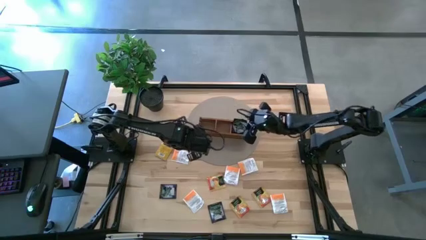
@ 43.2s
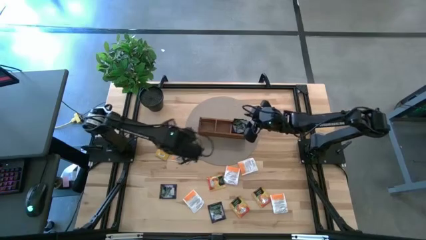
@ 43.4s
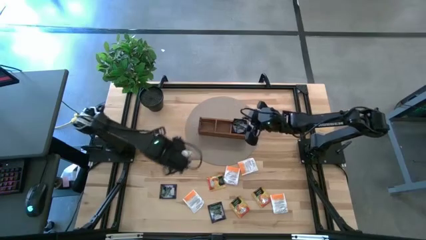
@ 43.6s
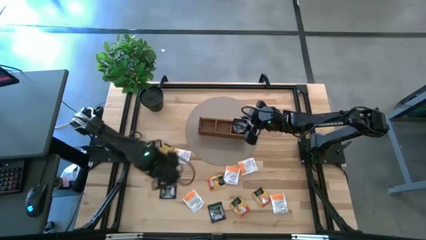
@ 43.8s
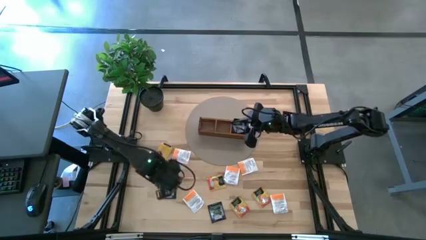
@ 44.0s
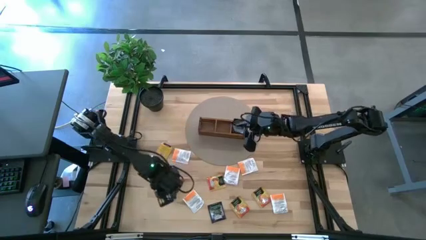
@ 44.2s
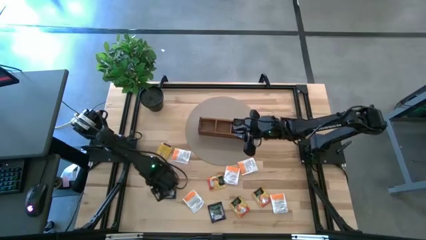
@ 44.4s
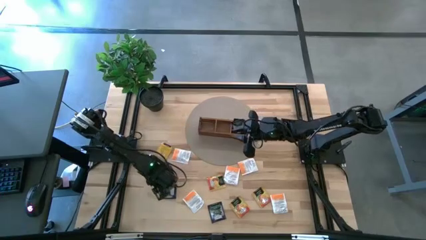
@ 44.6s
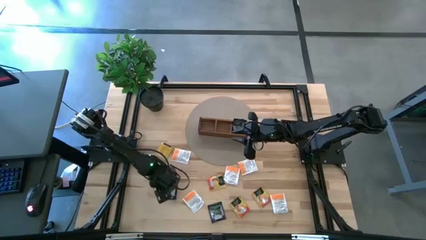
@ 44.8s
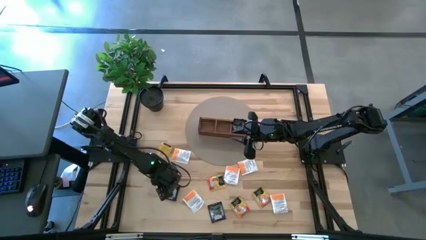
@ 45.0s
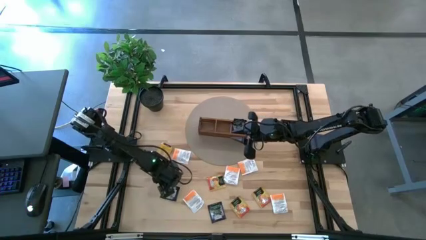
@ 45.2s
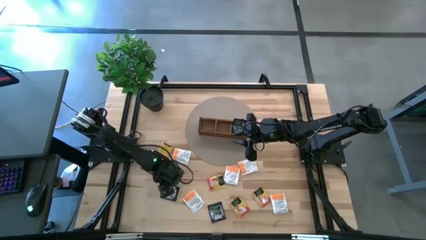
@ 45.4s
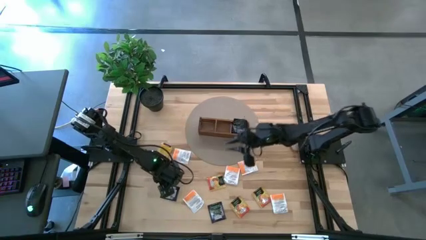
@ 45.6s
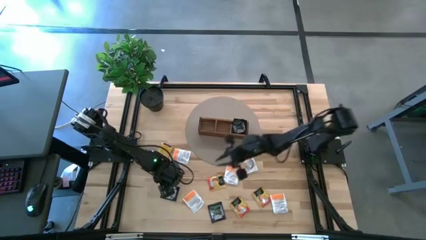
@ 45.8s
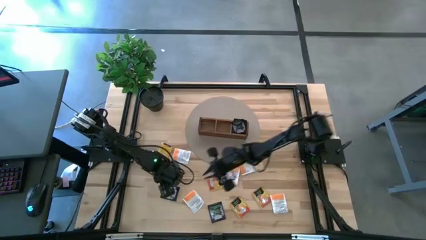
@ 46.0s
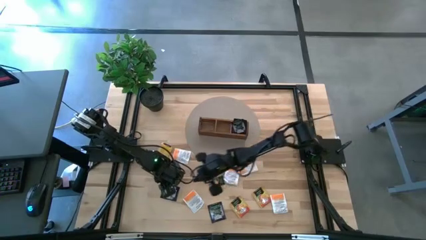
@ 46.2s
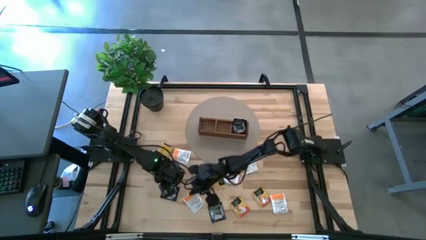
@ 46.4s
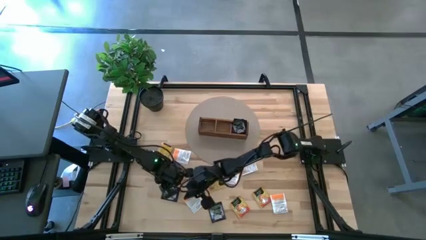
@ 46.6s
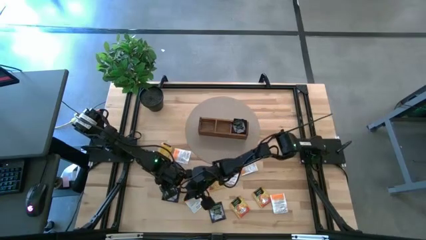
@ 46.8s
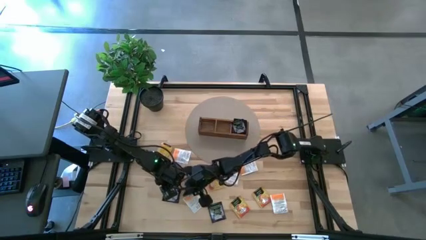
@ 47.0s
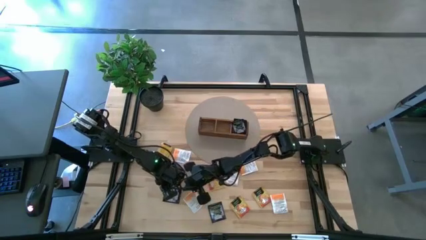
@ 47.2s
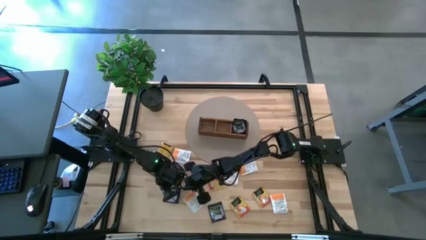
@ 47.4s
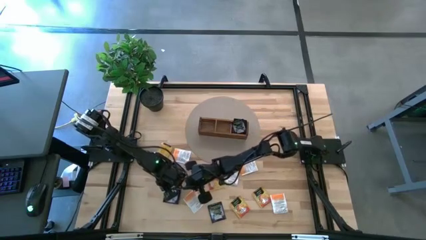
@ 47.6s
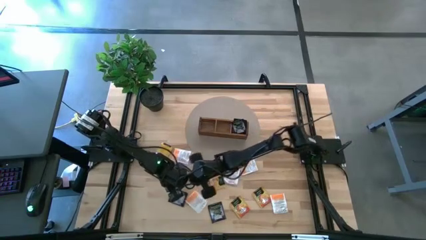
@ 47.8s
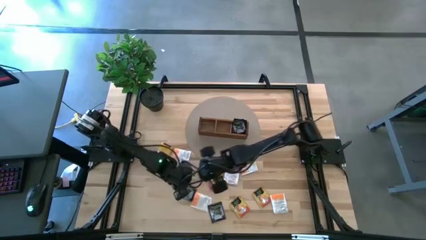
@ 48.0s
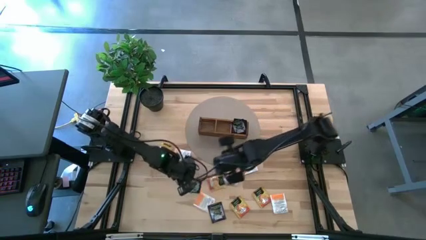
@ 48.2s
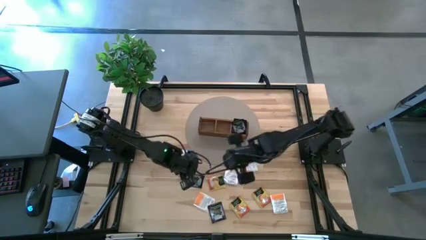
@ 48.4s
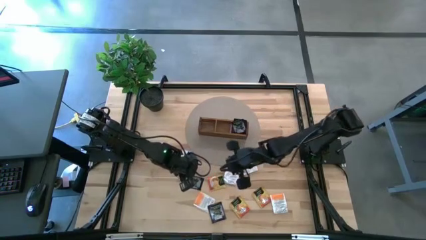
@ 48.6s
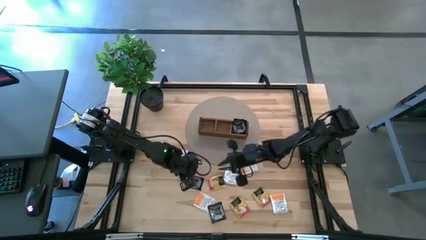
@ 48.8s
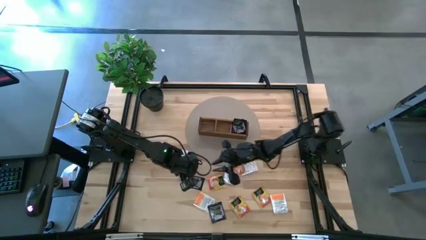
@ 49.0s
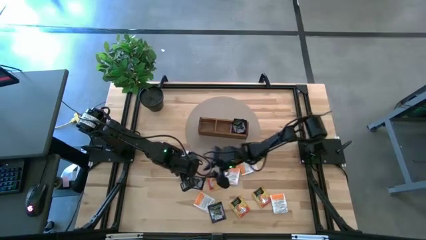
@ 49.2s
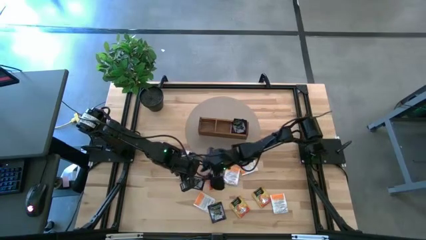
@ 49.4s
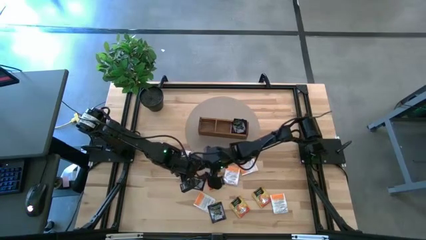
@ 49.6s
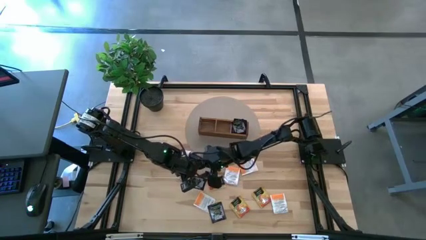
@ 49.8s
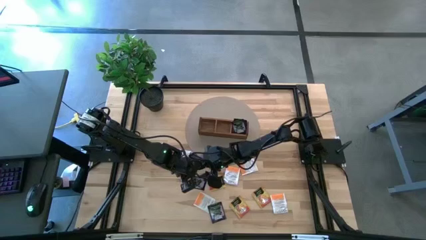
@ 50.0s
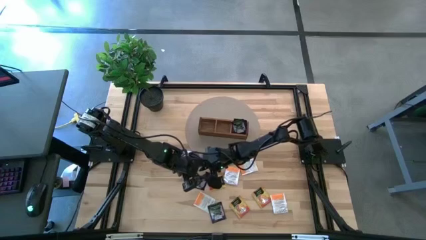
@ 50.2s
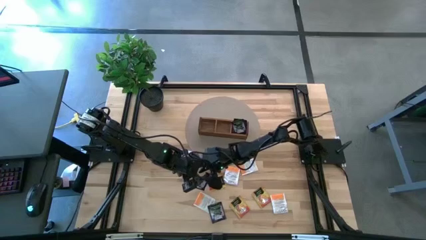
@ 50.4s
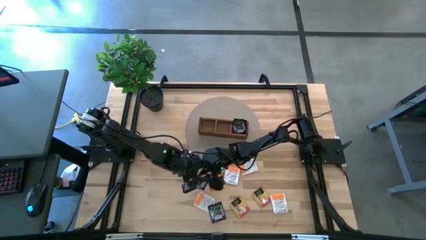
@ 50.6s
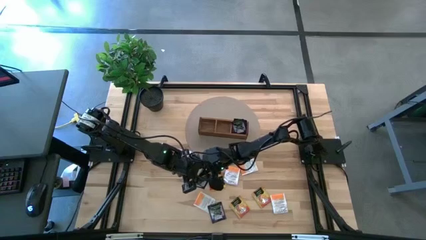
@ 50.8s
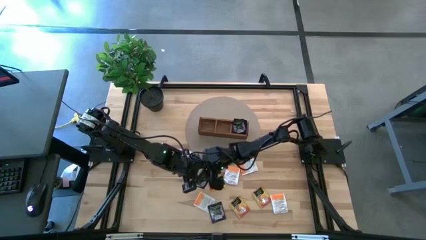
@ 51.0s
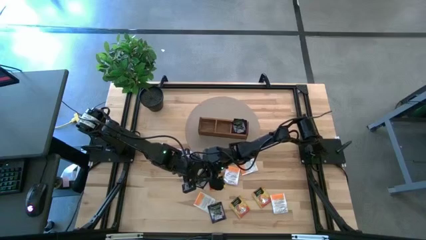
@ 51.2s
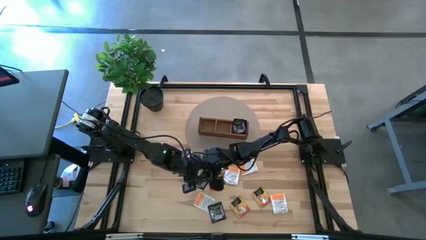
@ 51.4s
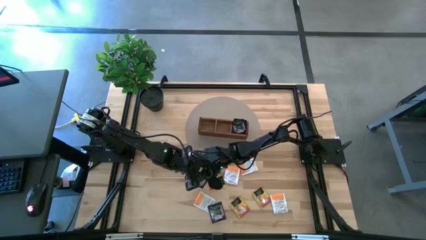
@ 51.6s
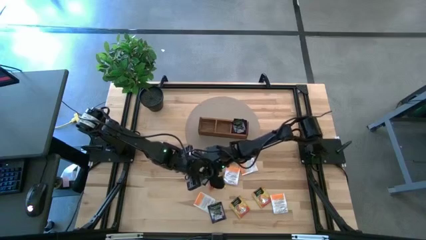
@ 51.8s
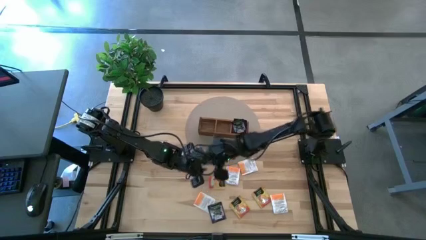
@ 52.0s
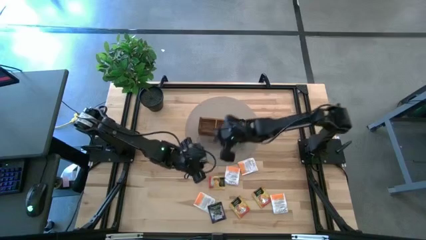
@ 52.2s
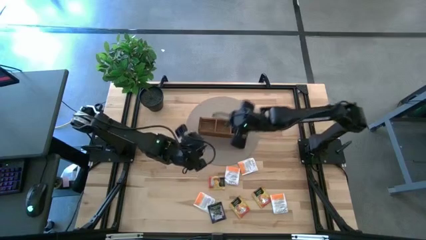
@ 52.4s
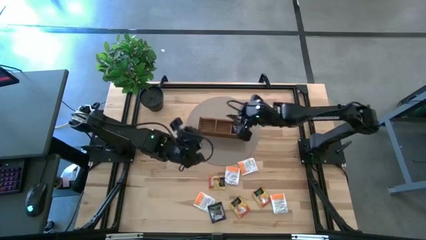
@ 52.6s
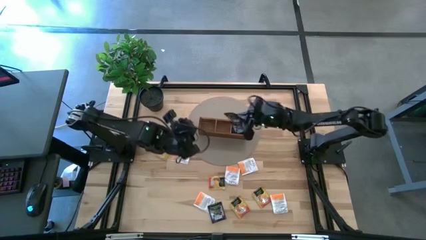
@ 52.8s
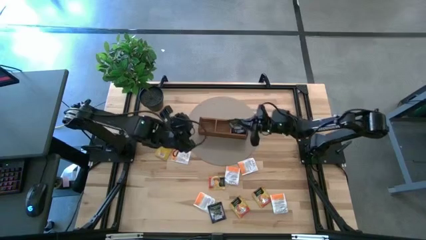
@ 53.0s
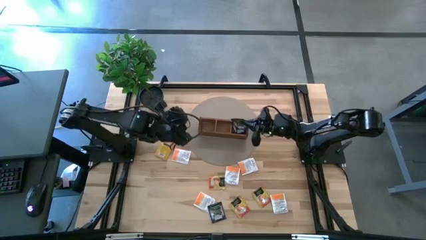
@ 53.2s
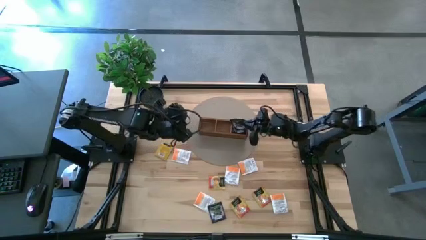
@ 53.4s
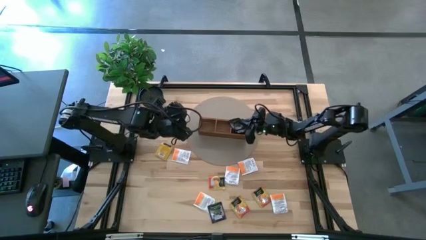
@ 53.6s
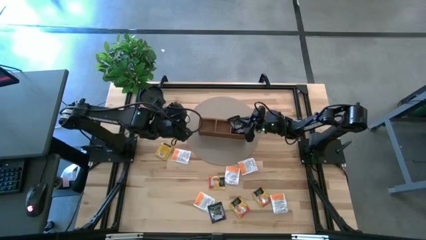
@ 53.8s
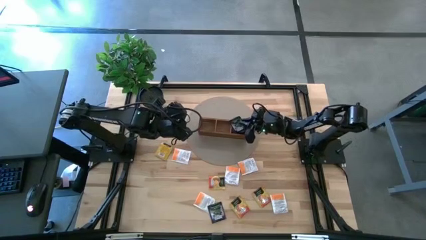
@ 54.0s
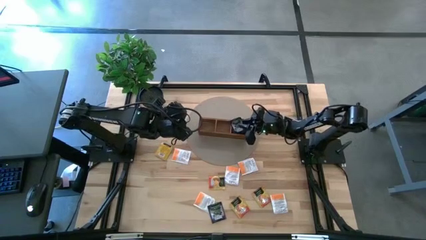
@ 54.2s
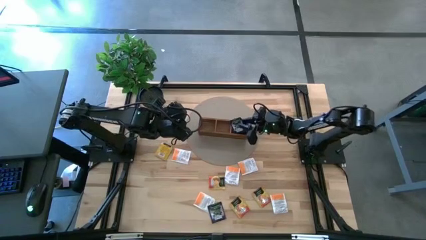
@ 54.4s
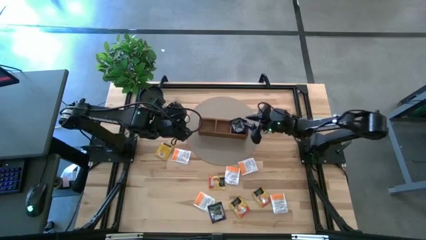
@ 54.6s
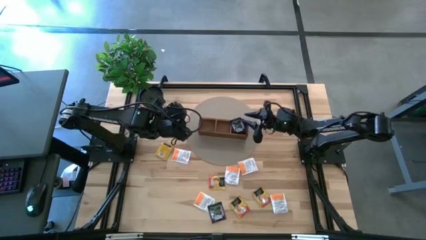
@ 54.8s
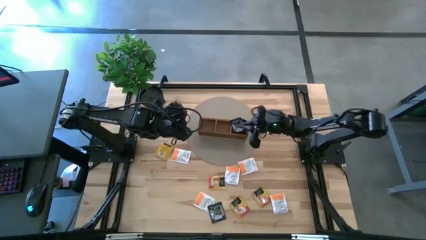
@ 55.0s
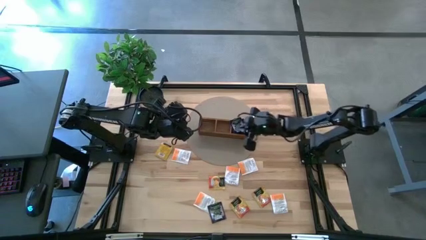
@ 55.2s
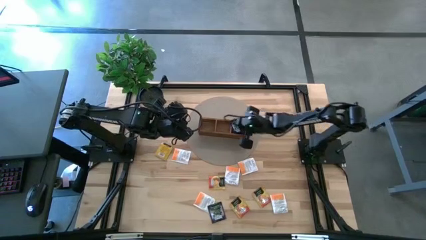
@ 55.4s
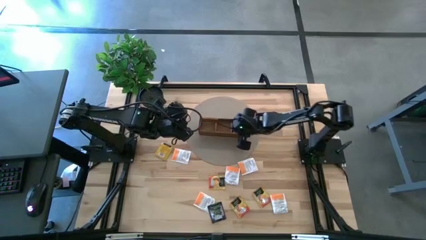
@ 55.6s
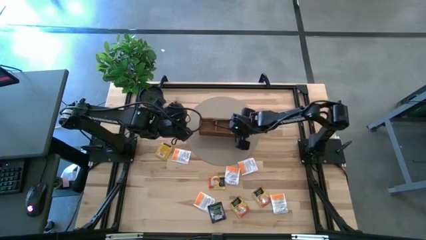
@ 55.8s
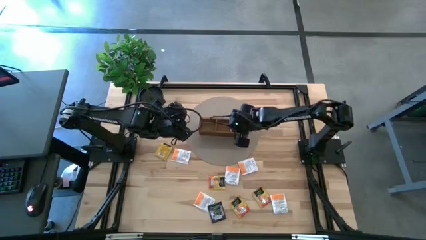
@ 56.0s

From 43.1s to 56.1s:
Task: Pick & Place Tea
Put the purple tea bag into the right section of the wooden organizer
